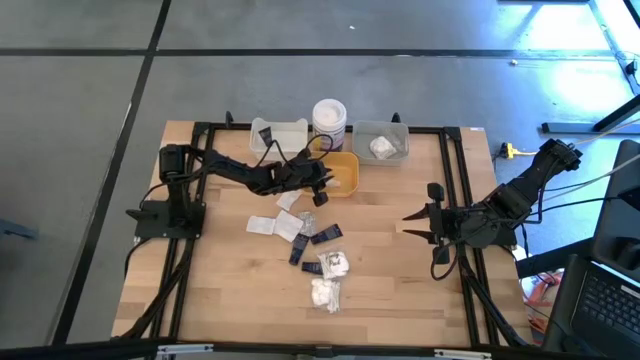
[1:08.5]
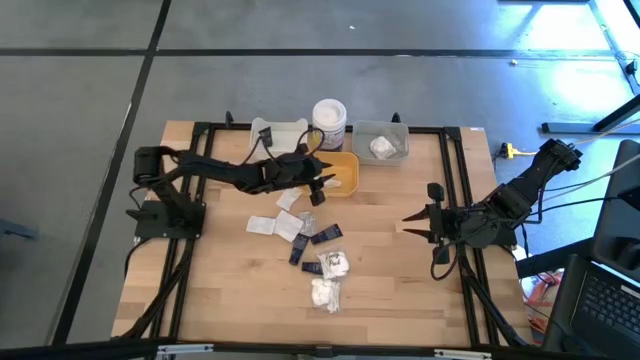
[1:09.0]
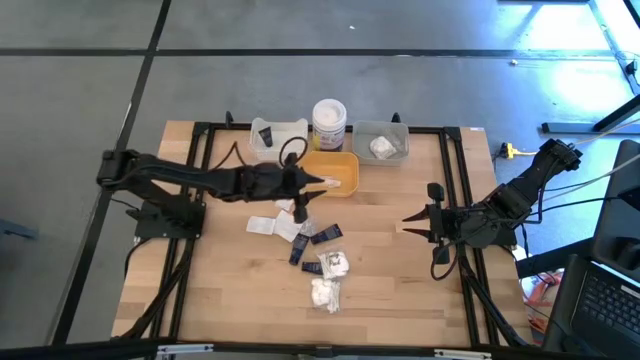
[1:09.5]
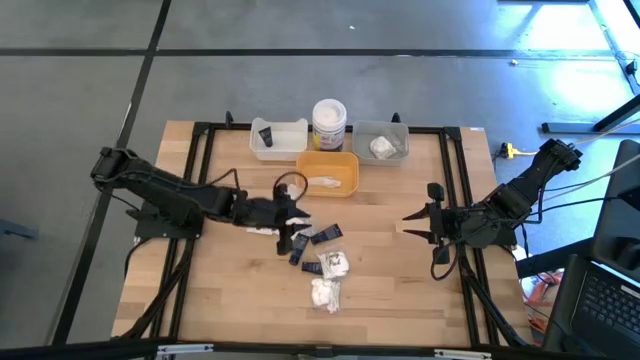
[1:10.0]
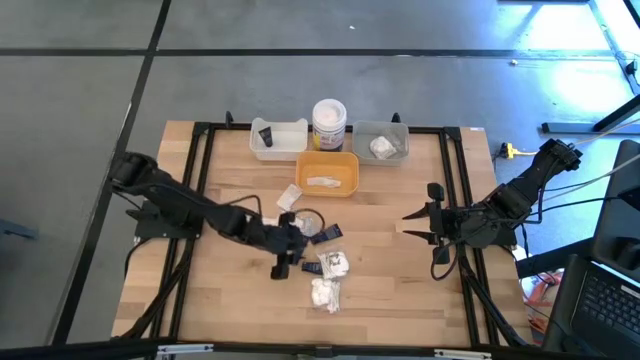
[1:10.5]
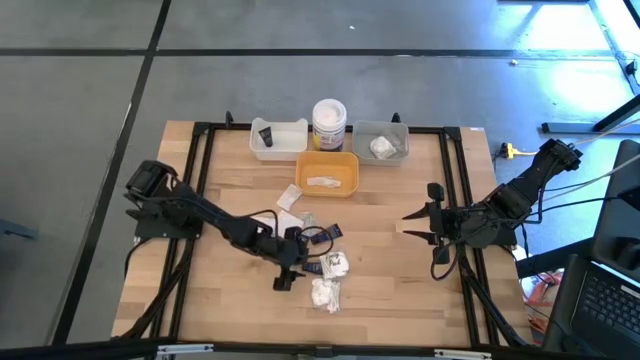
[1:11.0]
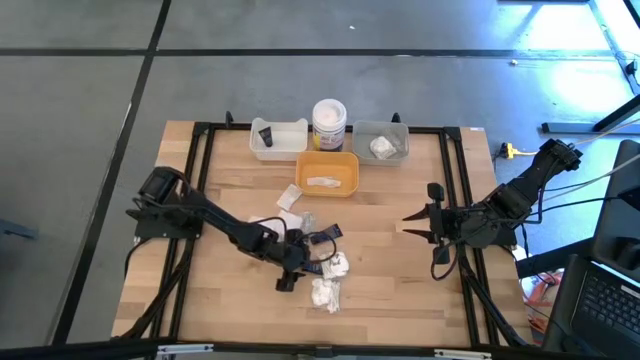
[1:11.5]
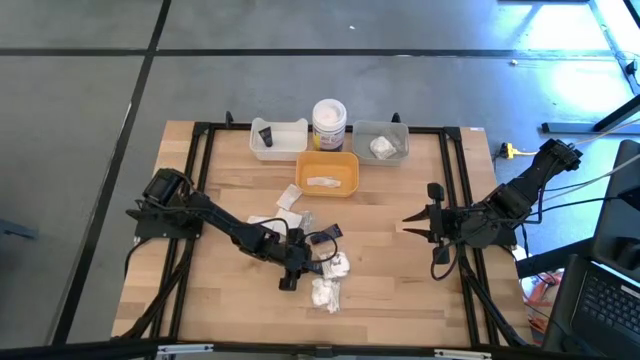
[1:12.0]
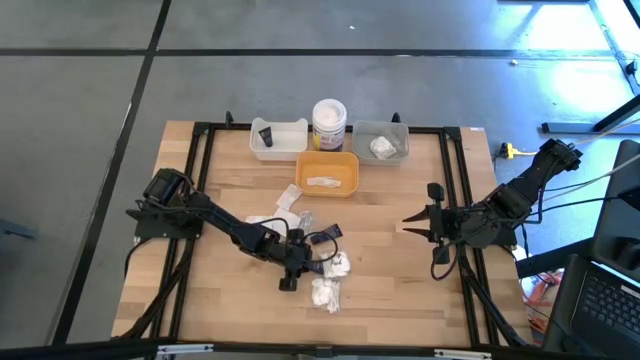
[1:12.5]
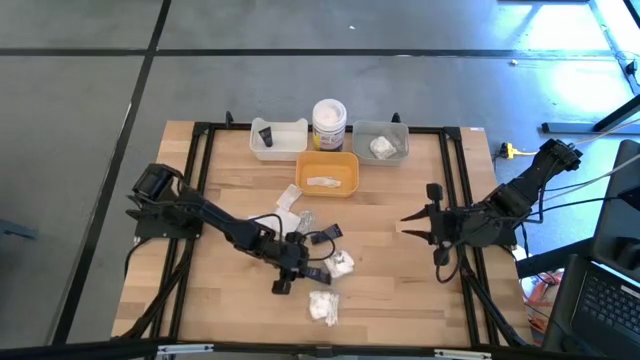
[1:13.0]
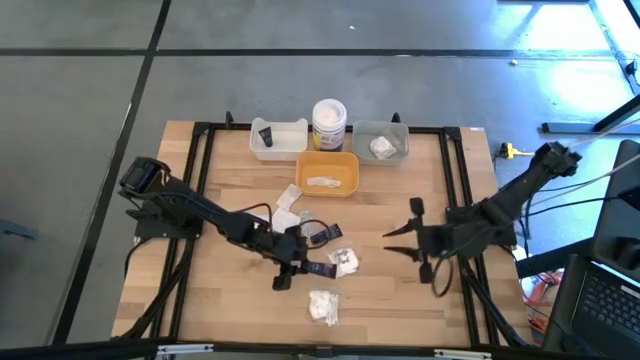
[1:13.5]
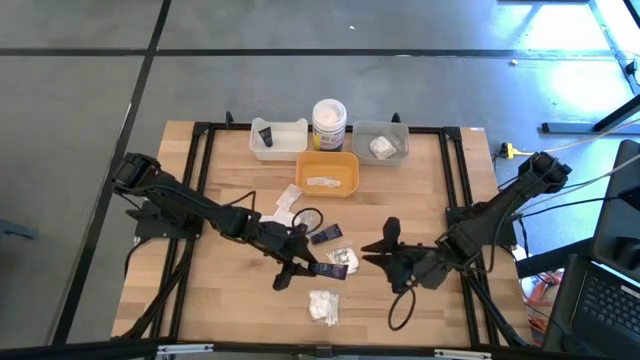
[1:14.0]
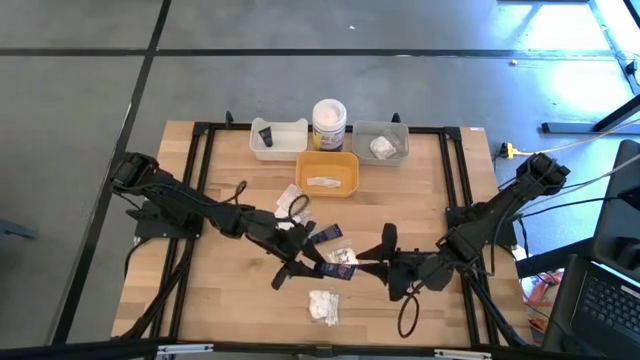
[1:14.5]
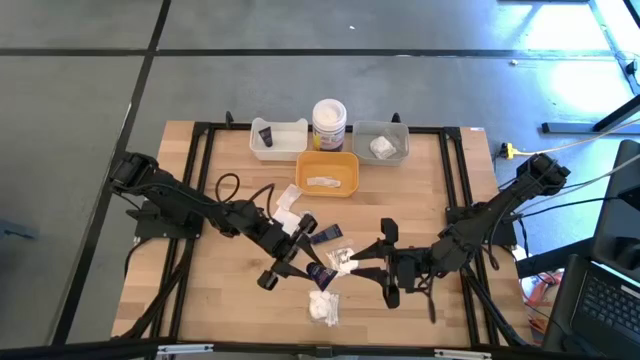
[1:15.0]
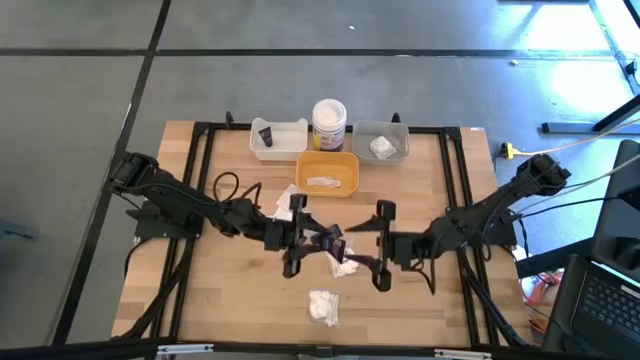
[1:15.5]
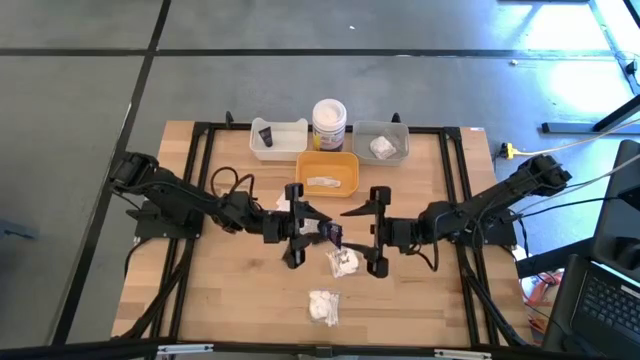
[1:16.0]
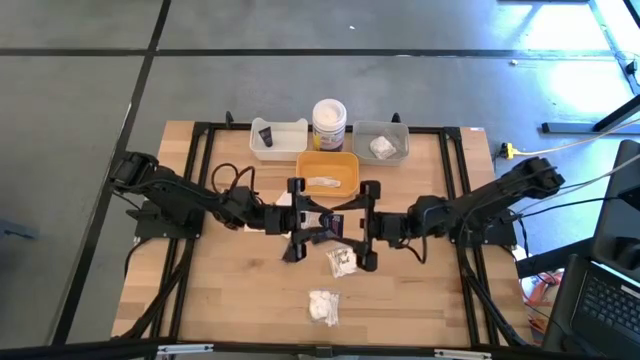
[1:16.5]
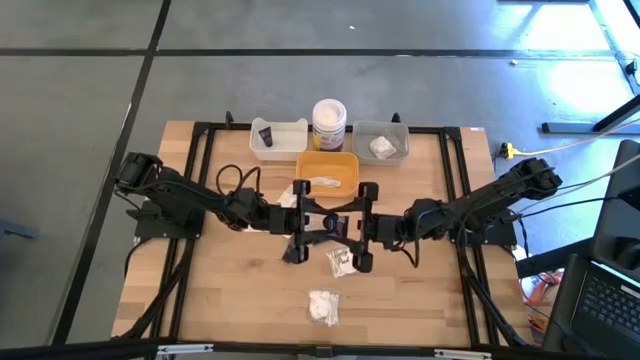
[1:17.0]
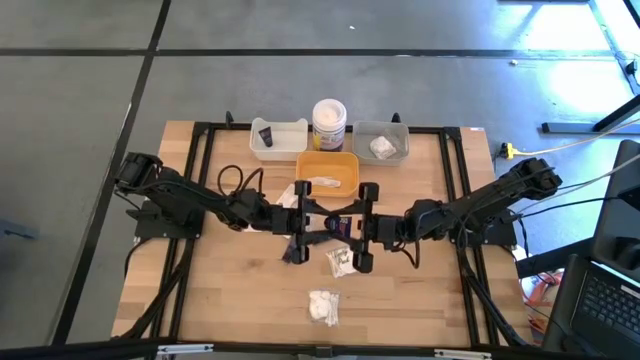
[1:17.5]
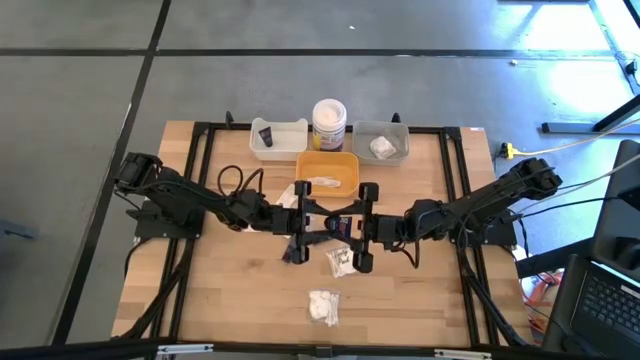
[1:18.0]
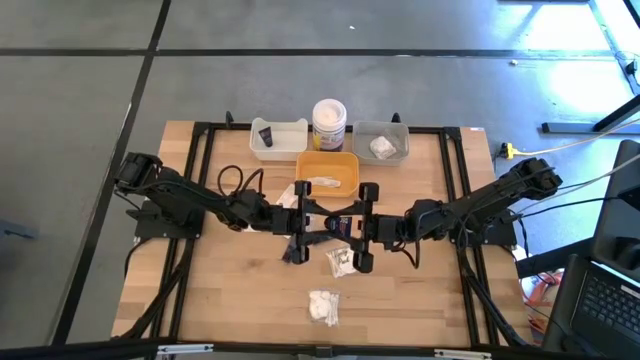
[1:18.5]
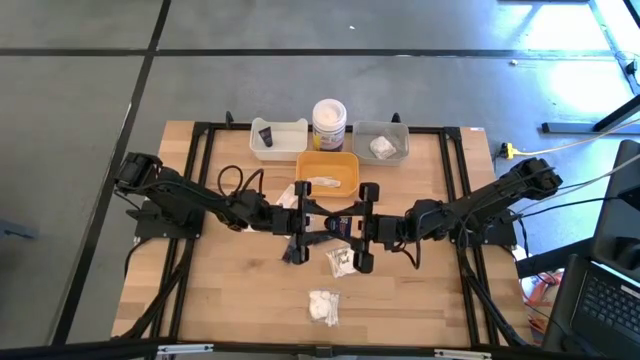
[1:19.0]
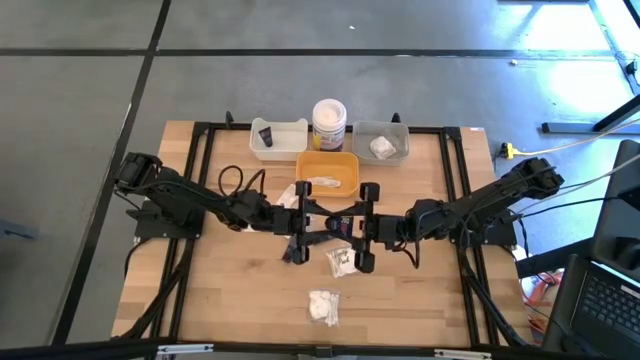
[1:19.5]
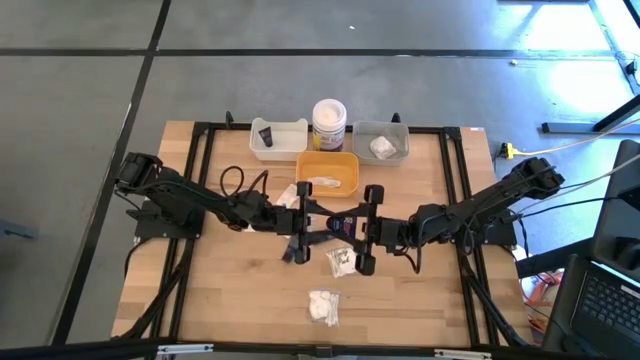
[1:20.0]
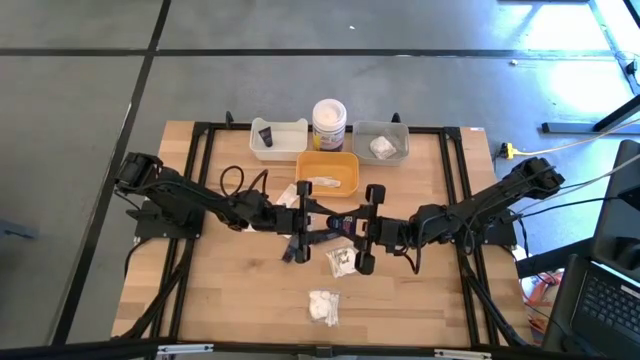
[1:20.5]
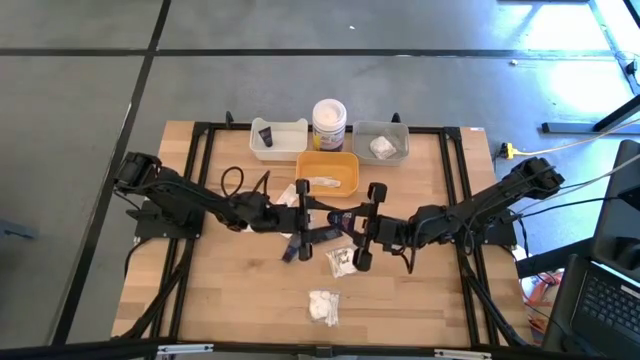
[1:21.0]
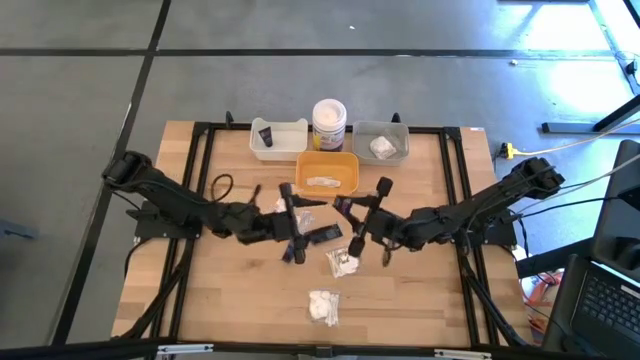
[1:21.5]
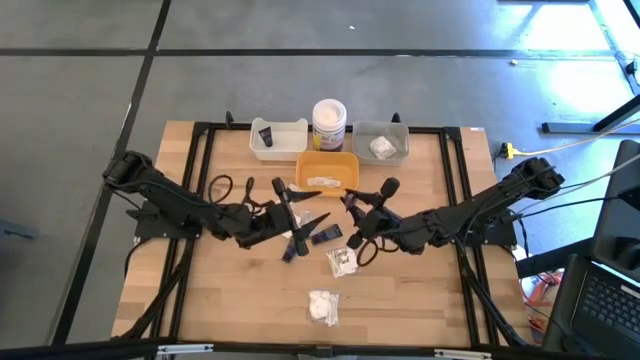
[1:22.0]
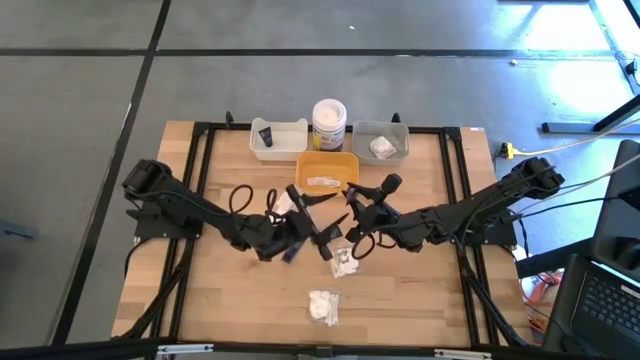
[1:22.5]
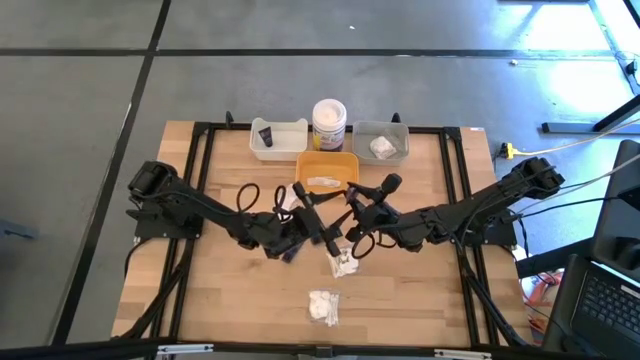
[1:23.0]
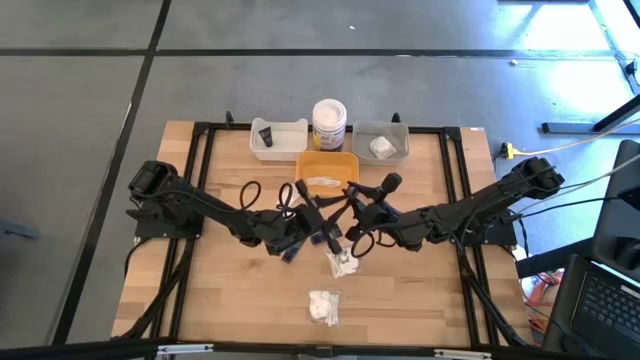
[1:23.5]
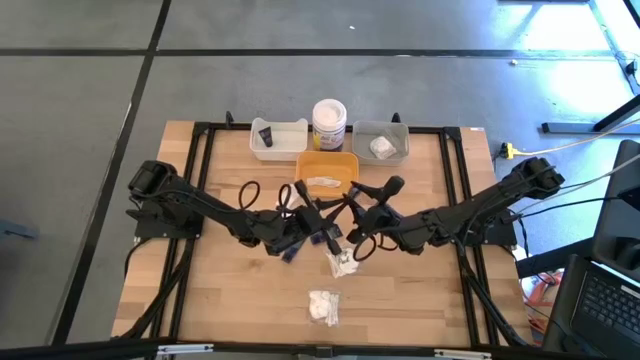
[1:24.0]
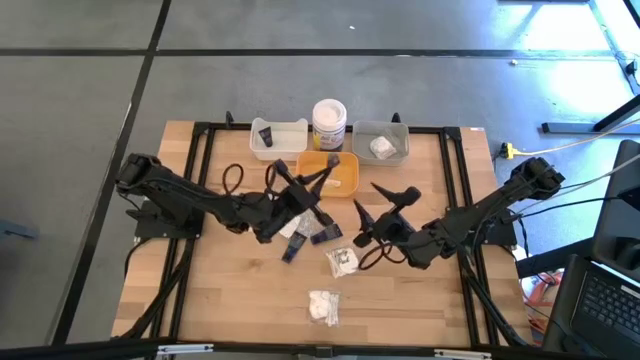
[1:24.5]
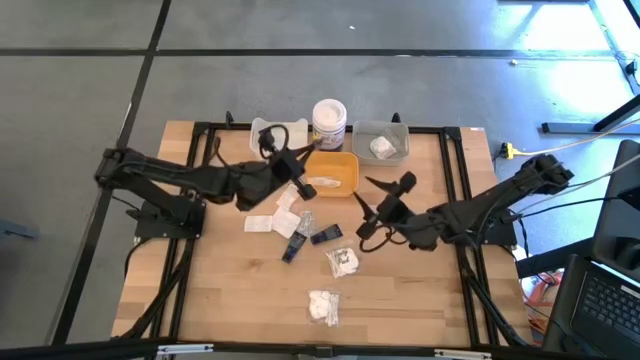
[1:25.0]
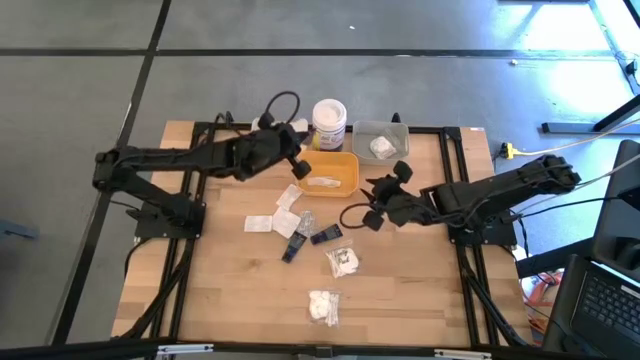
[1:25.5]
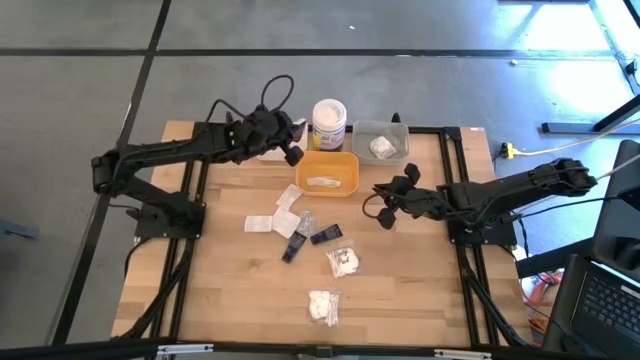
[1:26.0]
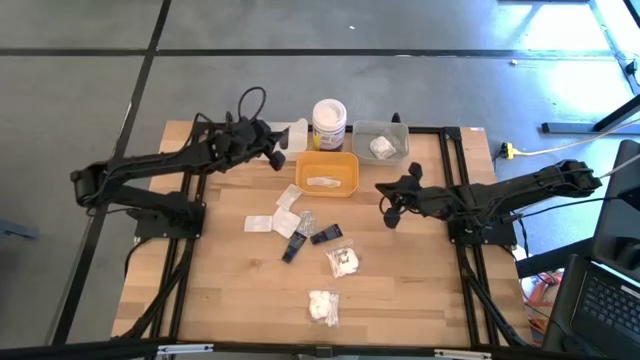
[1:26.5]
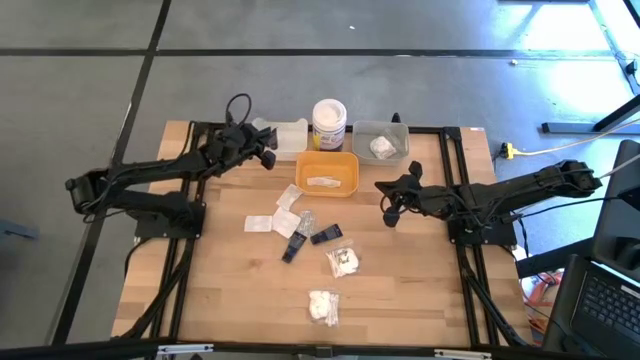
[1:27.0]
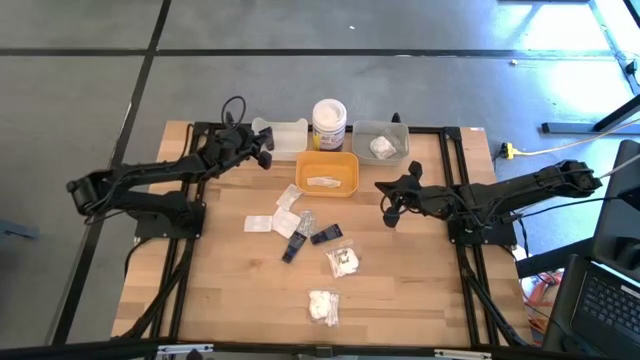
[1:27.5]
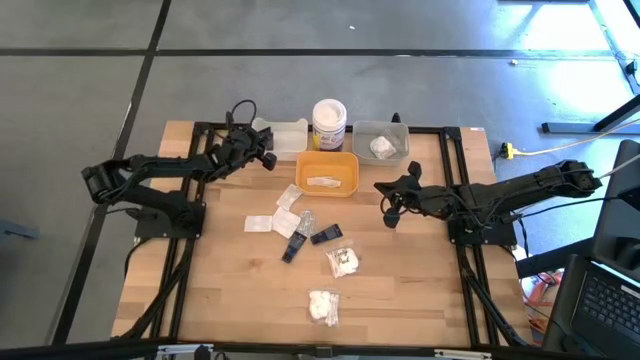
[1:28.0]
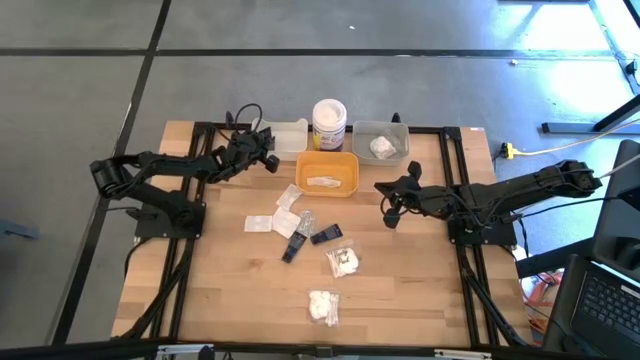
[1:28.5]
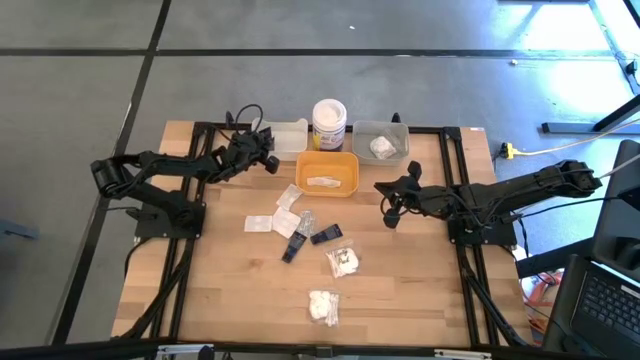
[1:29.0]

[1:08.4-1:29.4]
Task: Pick & Place Travel size toiletries
Put the blue shave cream into the white bin
